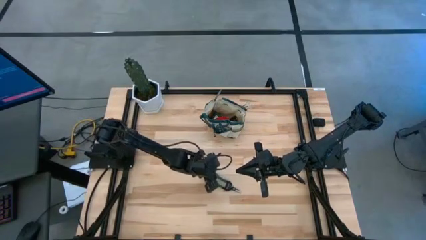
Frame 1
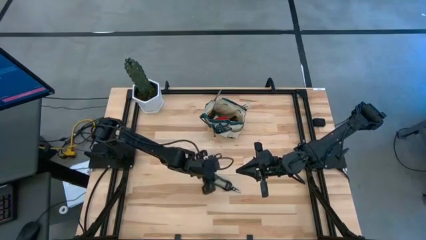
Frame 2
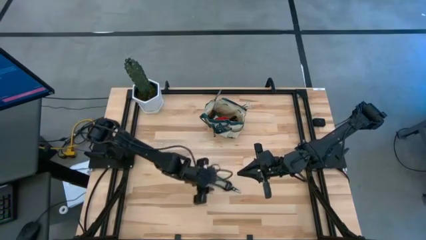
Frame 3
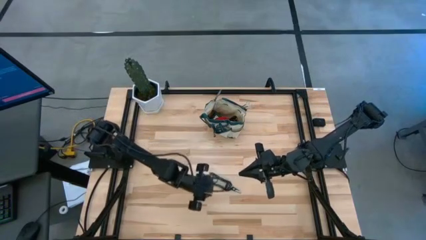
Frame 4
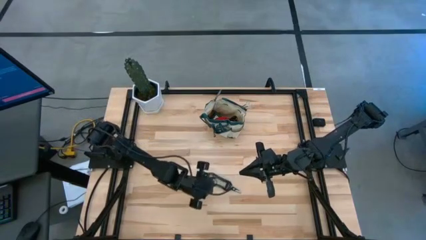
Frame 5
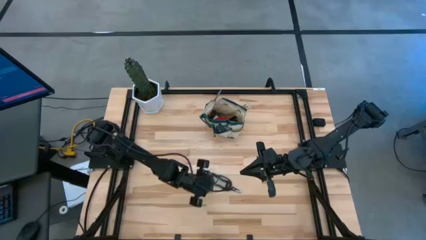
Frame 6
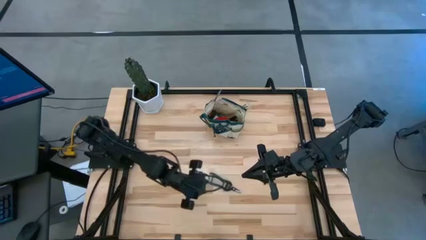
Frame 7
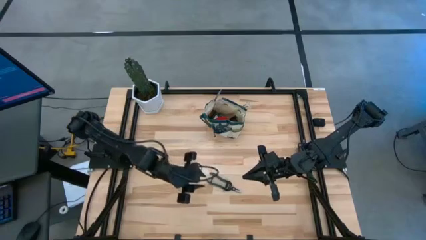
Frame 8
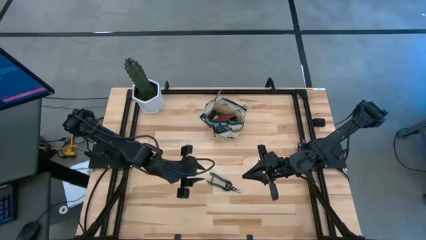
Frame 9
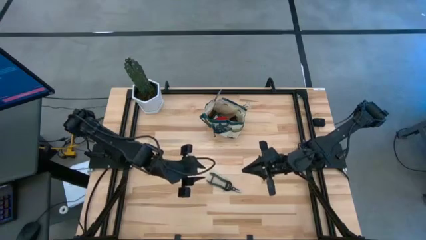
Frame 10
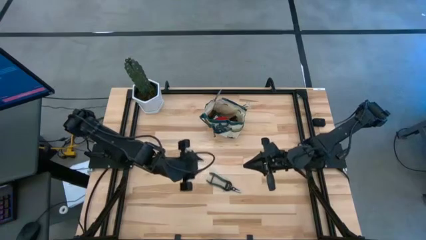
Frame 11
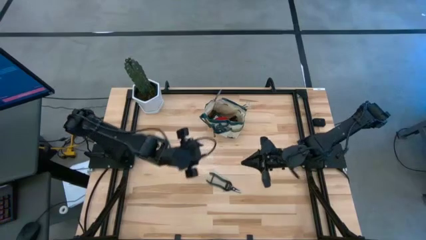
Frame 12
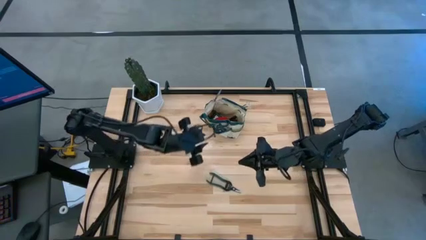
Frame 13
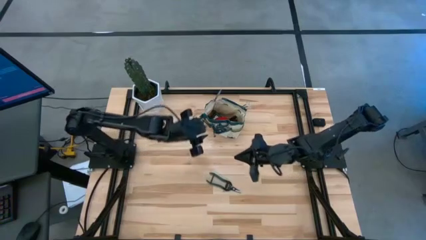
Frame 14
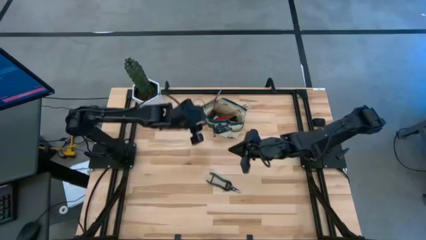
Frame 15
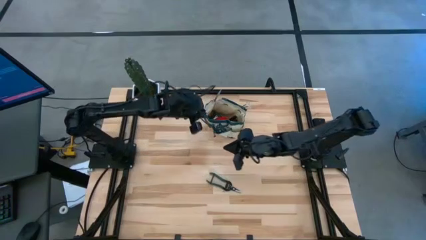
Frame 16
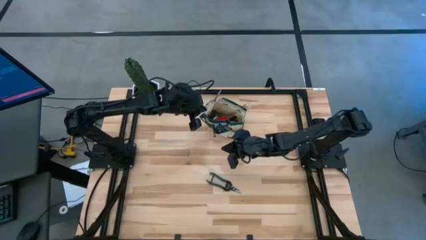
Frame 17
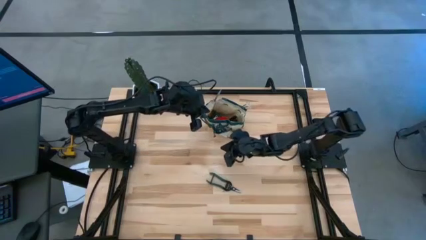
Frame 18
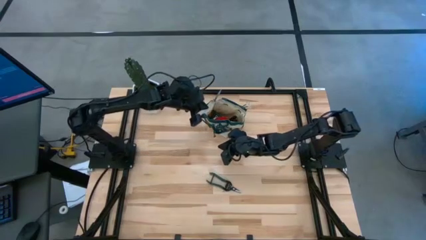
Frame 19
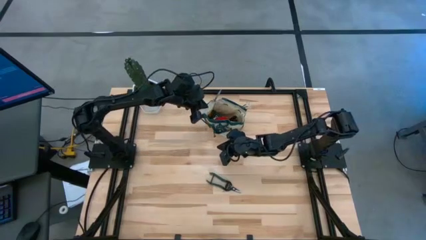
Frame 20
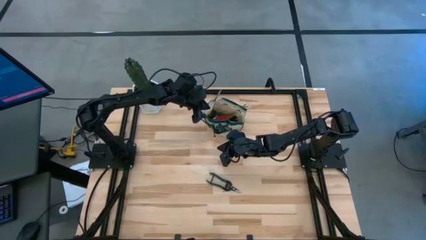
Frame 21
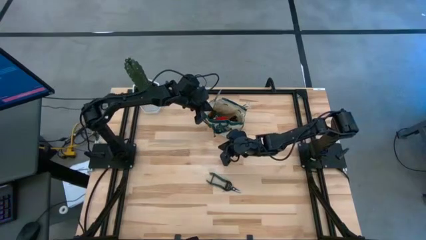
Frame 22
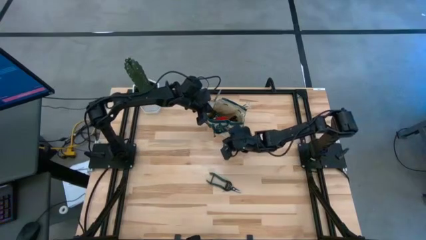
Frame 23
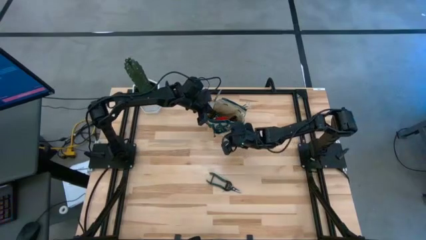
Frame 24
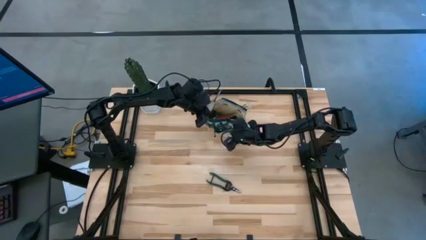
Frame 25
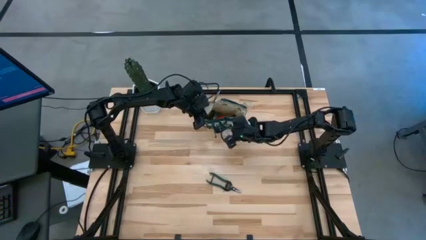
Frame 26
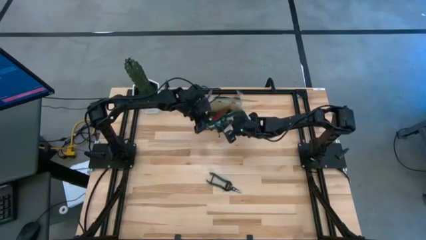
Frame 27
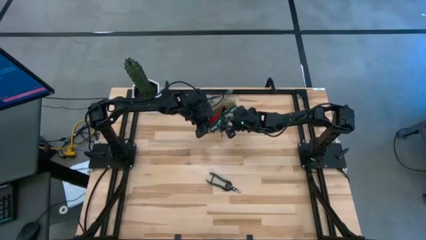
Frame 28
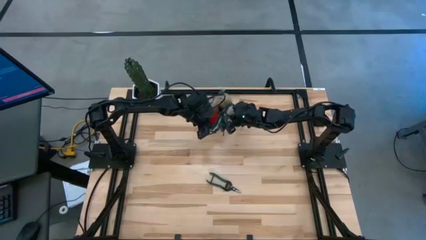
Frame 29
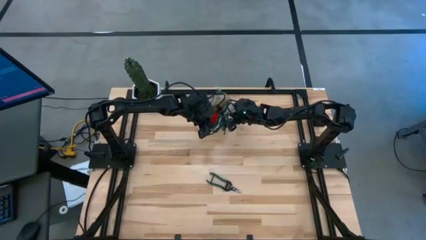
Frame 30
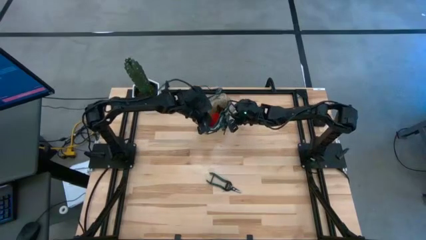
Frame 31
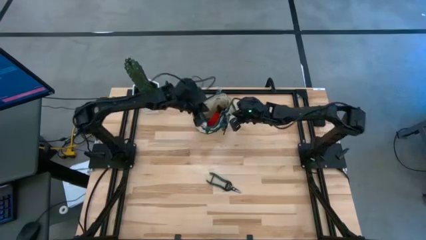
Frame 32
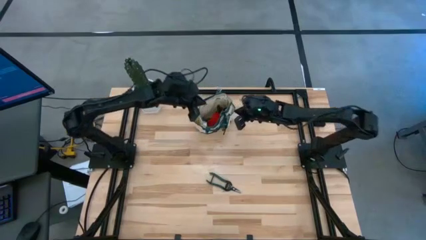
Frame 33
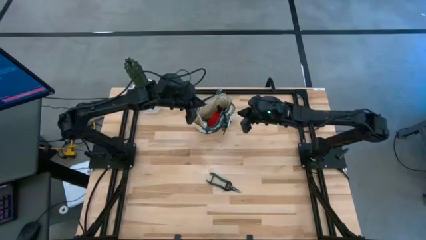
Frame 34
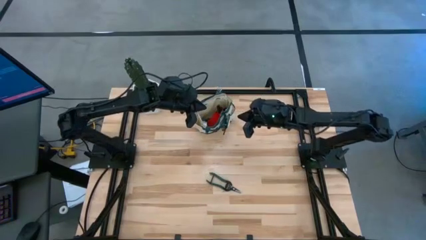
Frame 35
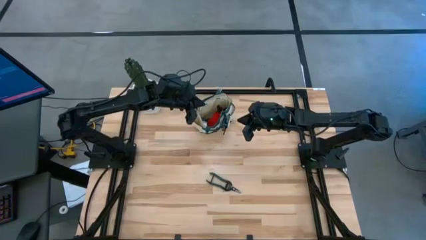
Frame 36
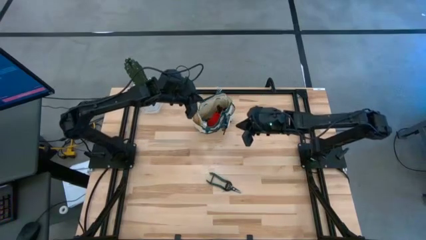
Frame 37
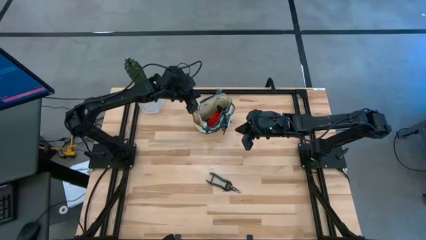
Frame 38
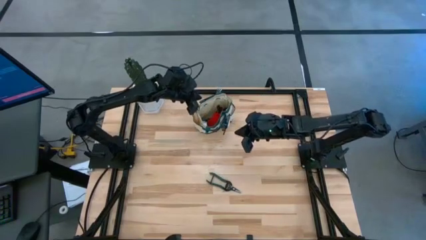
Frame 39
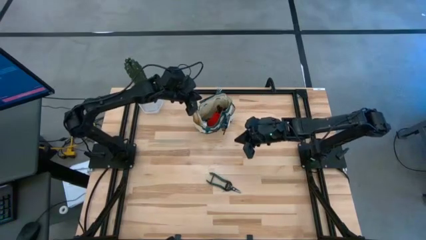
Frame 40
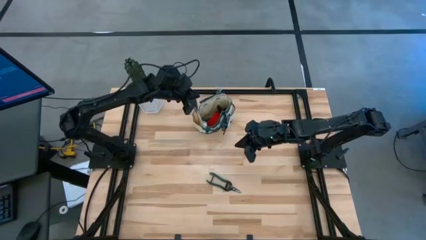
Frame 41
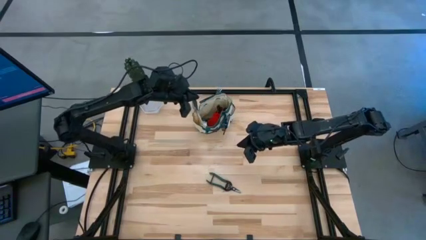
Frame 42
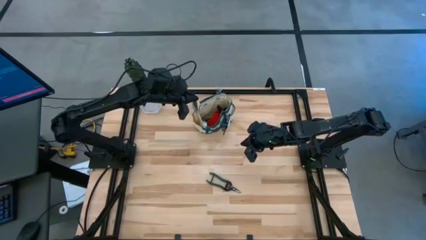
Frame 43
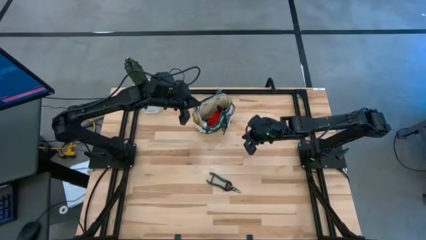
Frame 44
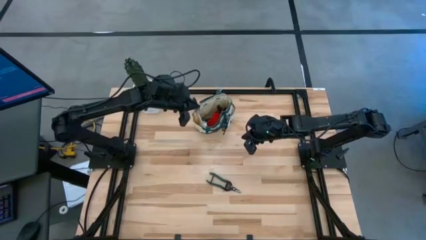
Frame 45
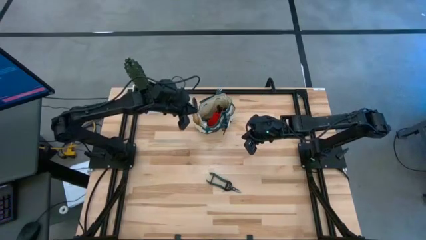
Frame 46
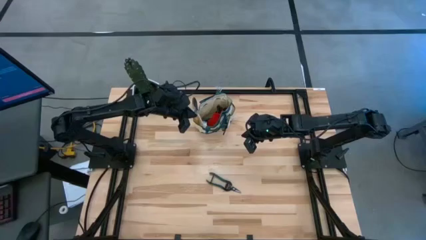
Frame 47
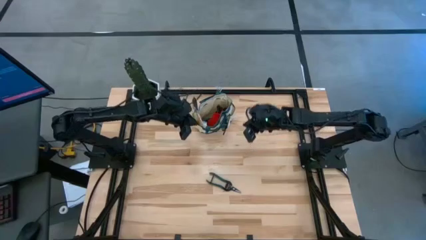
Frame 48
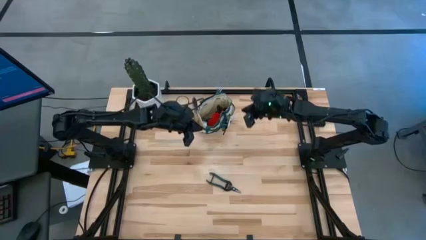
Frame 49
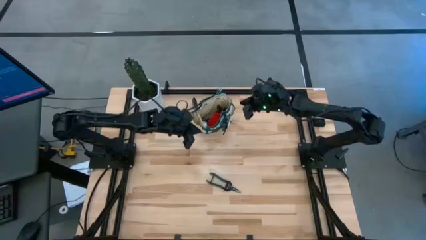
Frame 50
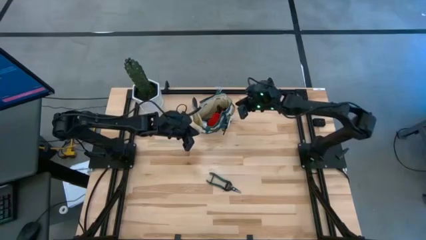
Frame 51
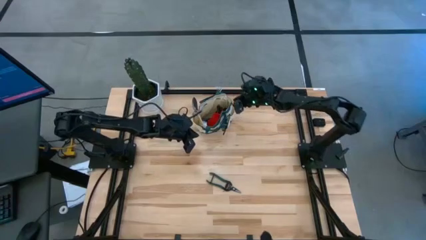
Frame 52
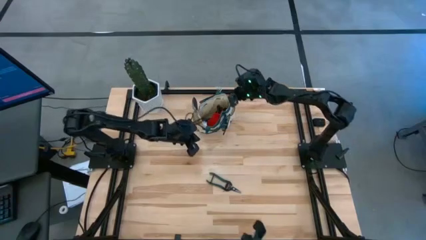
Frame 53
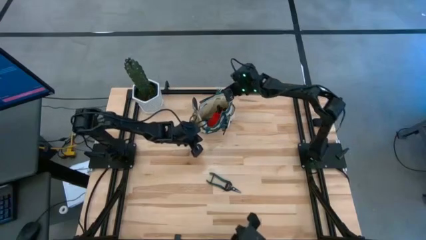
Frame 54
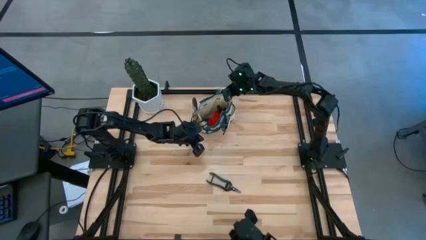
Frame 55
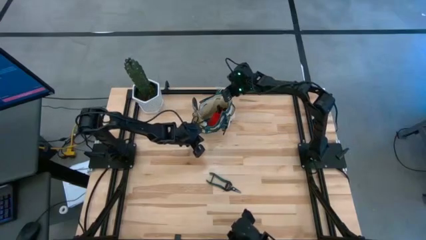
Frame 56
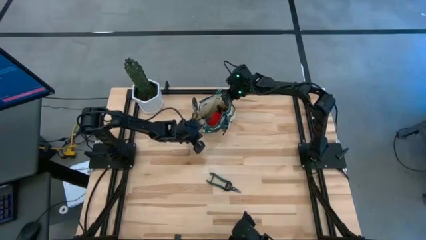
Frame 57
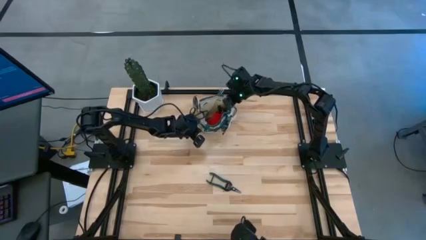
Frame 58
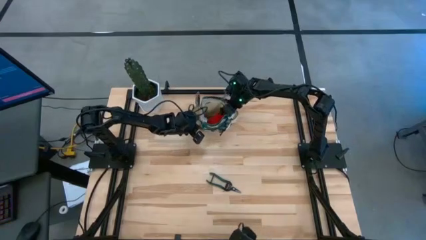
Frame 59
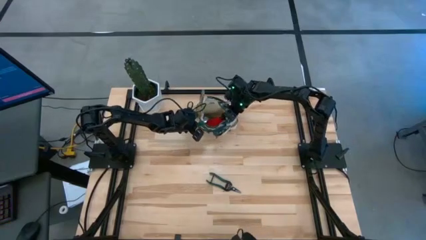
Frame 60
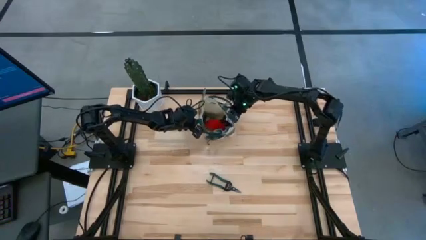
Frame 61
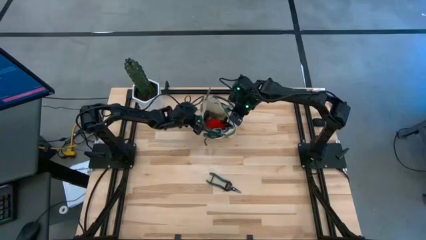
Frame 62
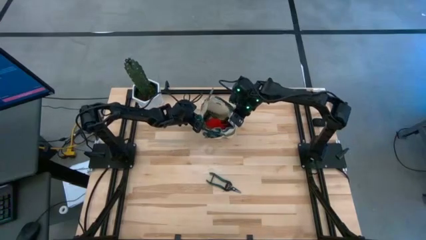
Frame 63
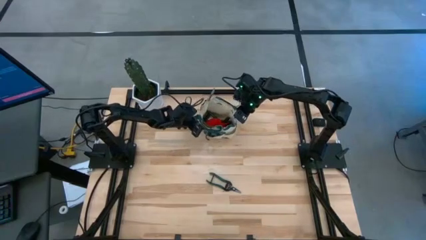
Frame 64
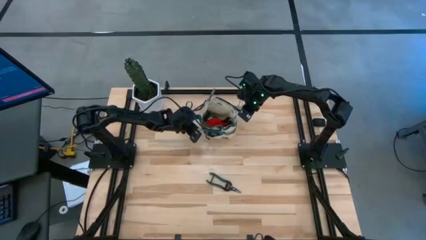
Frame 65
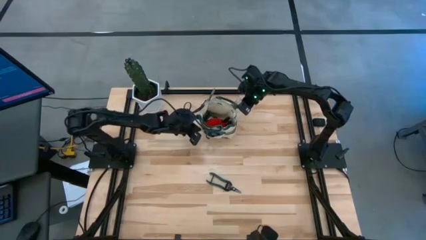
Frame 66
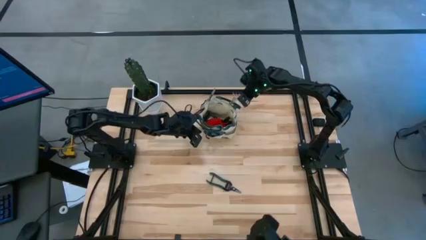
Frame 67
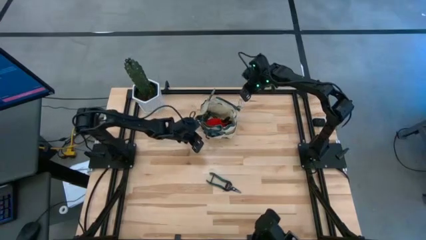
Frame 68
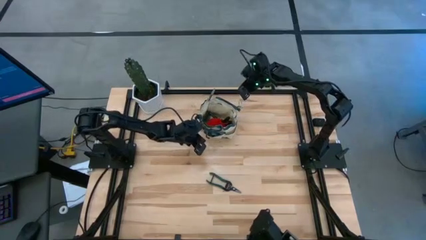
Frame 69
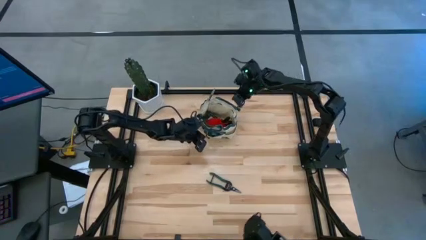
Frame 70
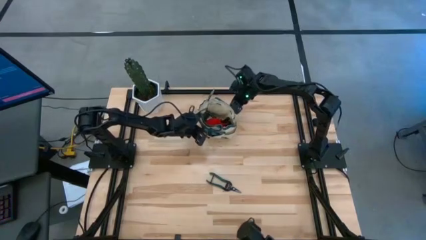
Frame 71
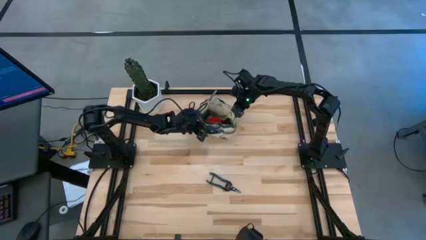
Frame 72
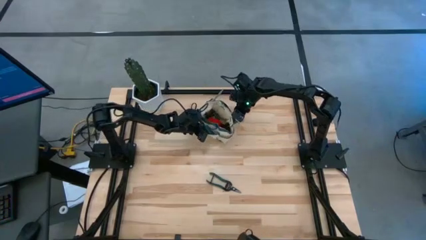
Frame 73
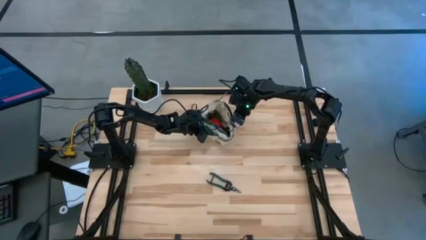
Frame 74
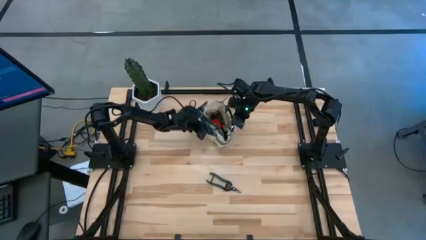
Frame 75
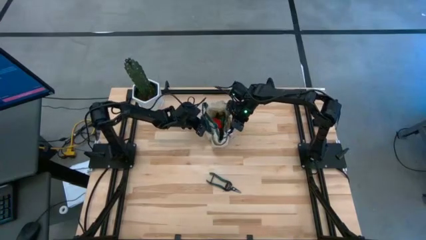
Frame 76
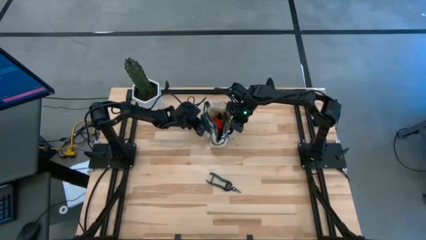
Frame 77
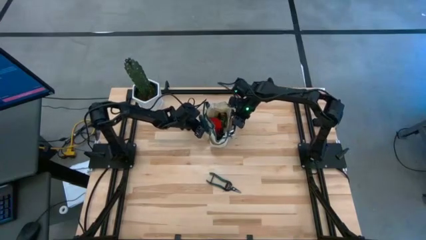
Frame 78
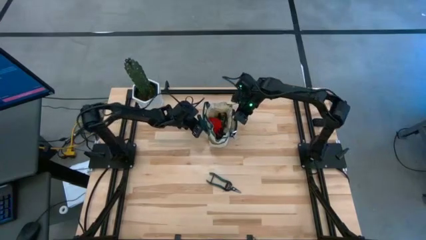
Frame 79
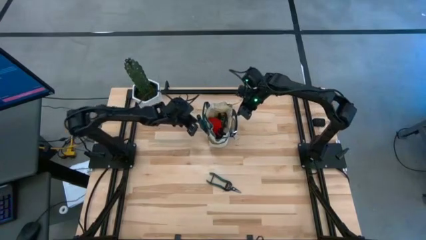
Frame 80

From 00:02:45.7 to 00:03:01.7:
Task: Pick & Place Garden tools in Gardening bag
Adjust the gardening bag
